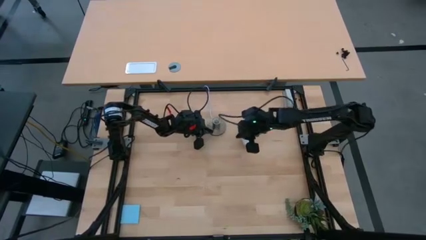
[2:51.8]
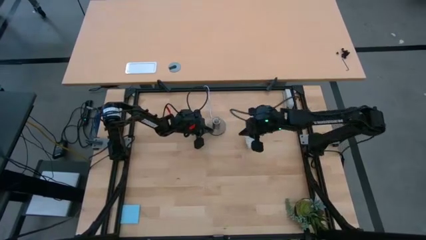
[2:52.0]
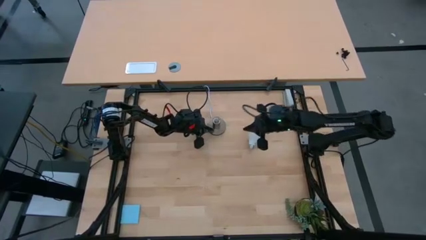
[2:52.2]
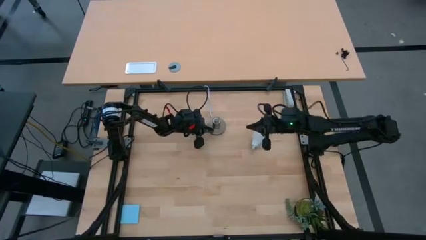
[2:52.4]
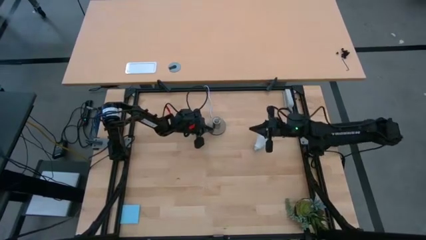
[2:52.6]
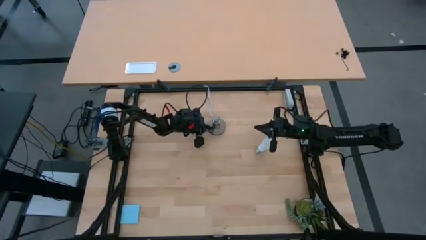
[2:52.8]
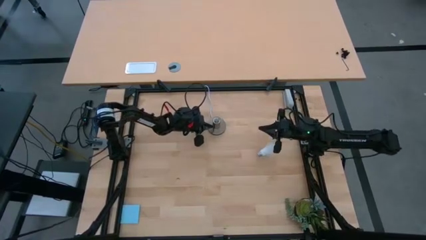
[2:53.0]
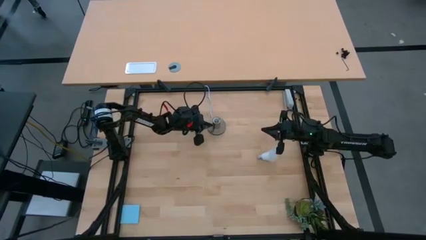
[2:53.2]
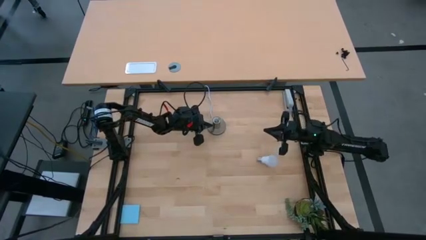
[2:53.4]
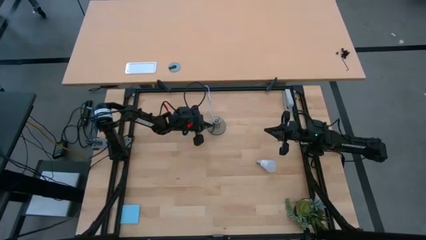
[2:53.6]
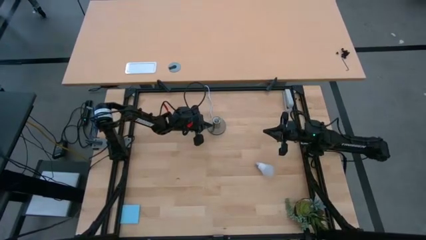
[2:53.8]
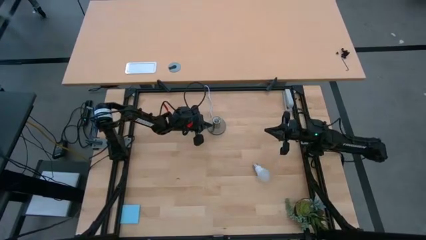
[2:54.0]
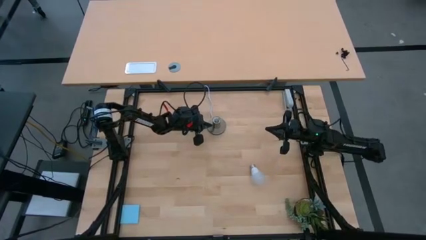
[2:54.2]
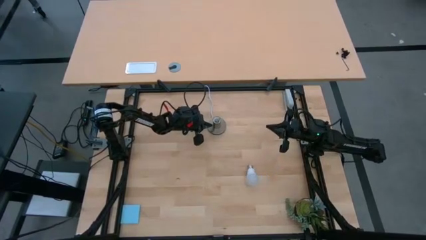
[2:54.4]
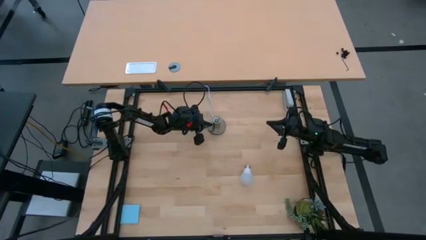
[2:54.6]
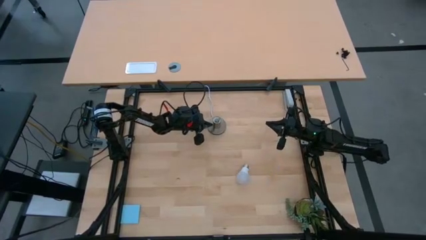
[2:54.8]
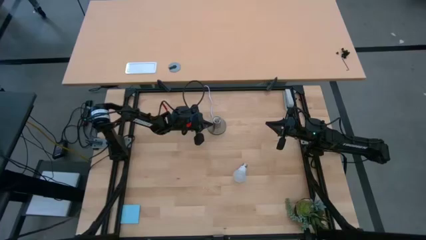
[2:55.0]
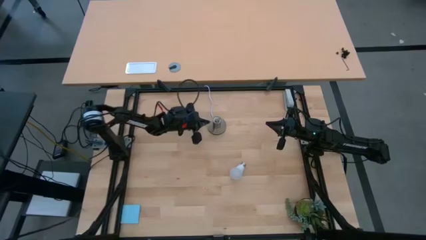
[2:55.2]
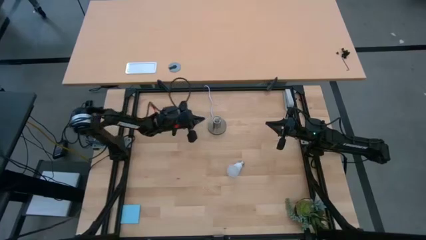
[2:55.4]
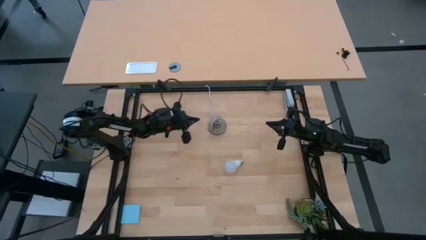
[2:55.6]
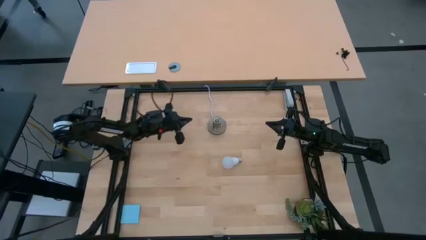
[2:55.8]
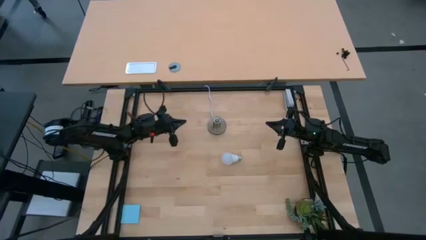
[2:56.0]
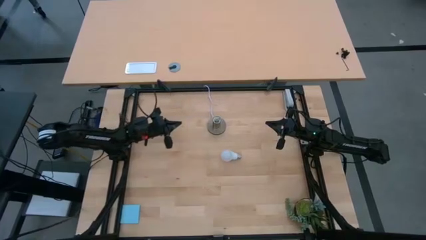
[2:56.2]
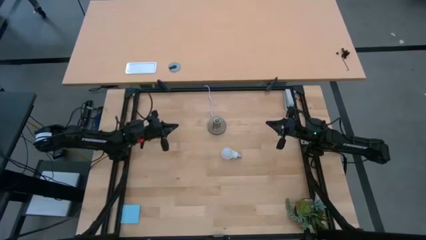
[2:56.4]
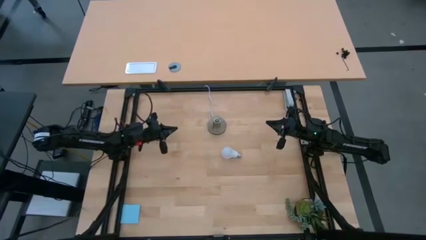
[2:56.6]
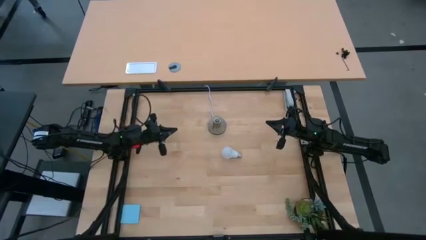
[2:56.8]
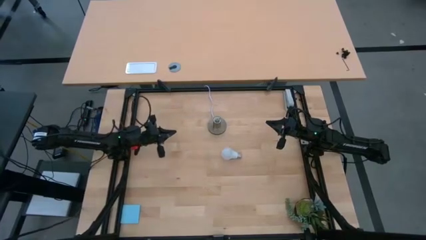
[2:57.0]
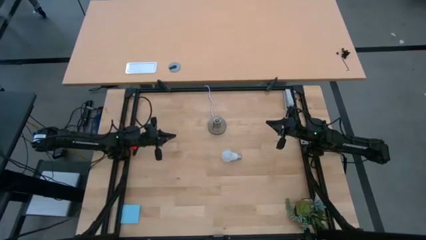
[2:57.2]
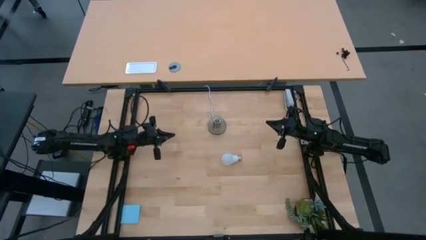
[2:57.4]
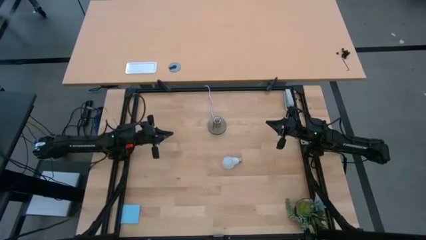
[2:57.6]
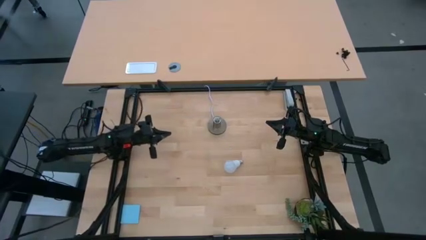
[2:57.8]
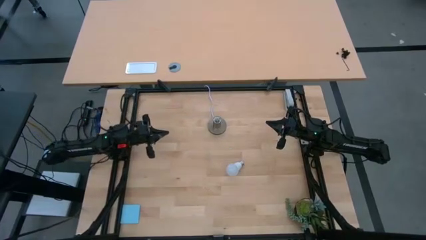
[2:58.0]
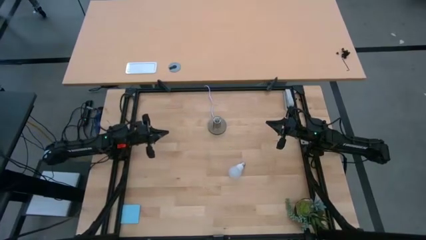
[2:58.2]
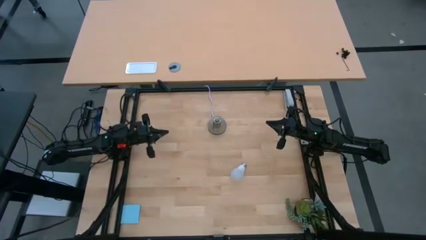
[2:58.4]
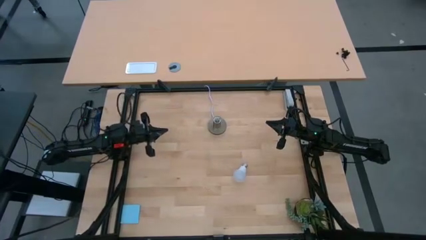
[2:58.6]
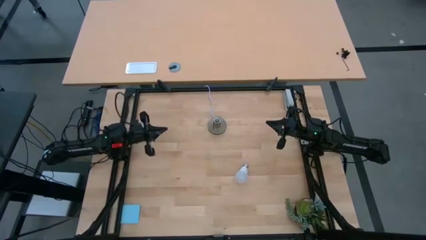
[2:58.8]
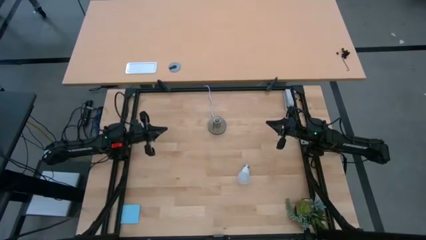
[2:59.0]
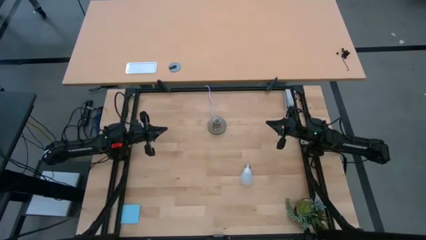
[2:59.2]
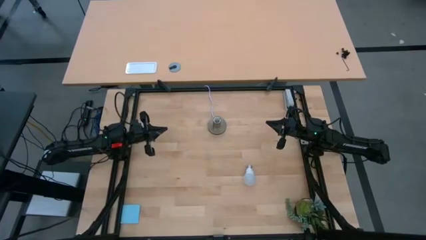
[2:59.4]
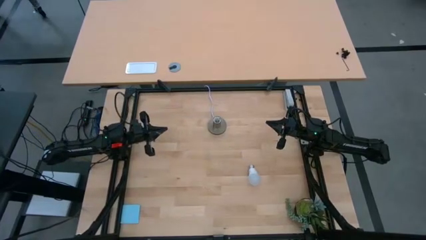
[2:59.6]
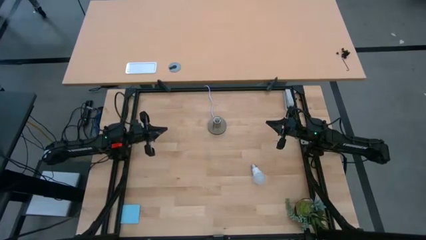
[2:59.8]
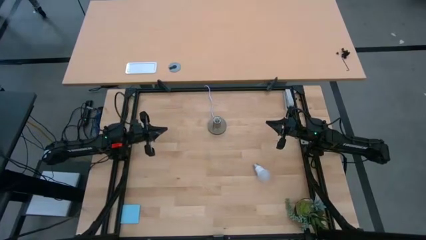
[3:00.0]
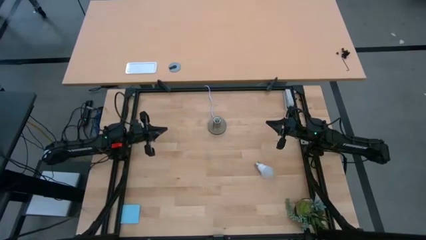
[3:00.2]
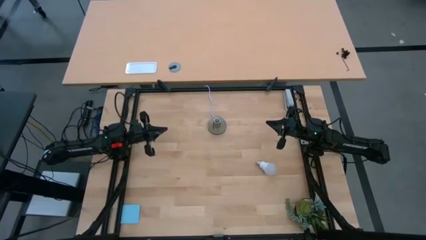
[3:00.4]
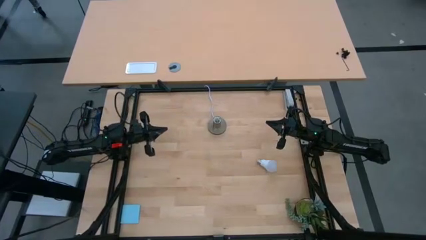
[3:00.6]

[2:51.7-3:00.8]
Task: Screw lightbulb
Return to home position

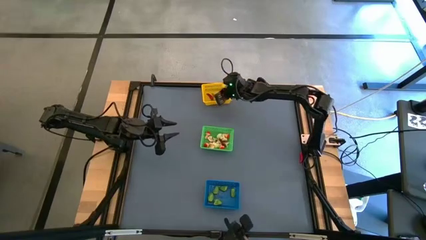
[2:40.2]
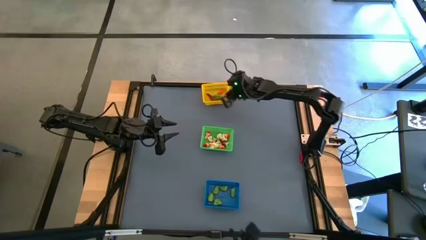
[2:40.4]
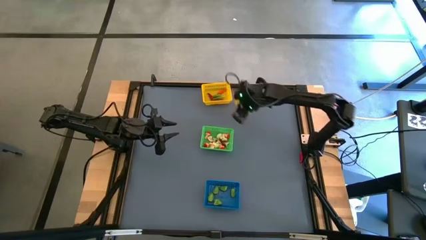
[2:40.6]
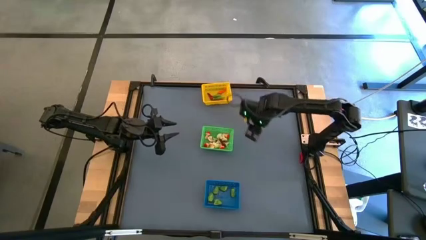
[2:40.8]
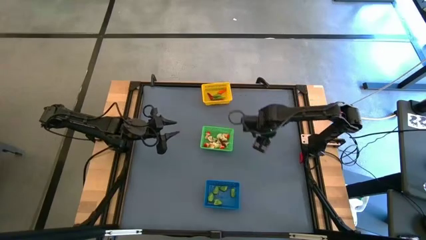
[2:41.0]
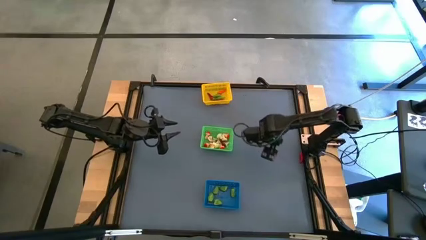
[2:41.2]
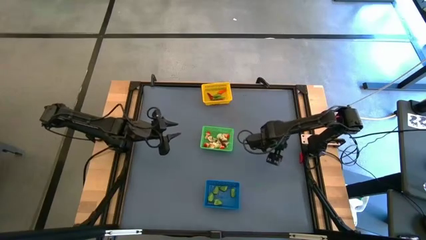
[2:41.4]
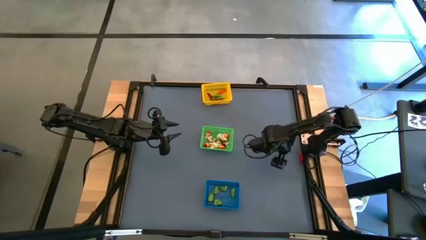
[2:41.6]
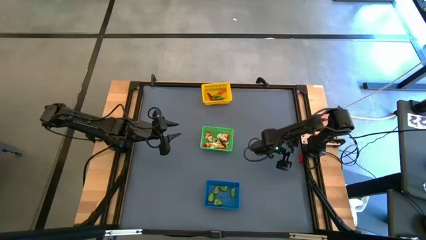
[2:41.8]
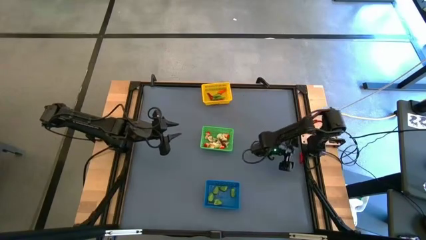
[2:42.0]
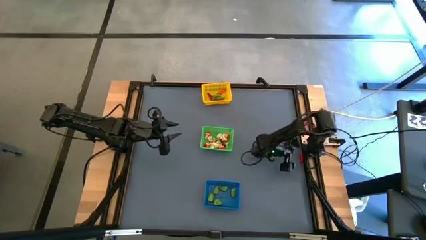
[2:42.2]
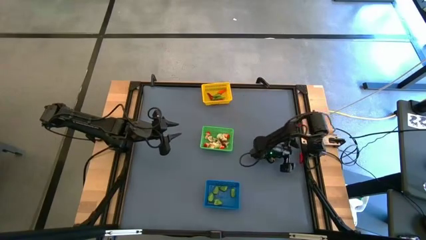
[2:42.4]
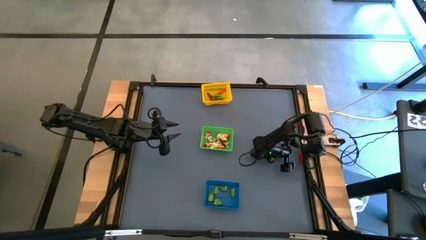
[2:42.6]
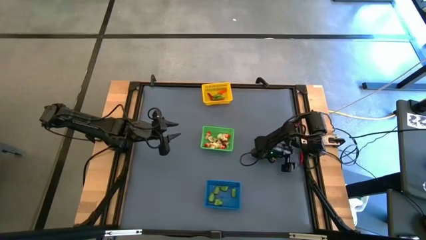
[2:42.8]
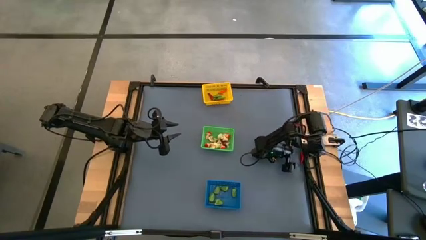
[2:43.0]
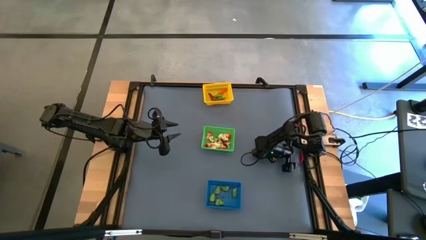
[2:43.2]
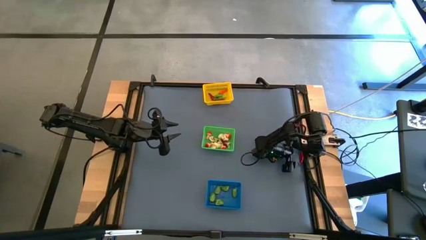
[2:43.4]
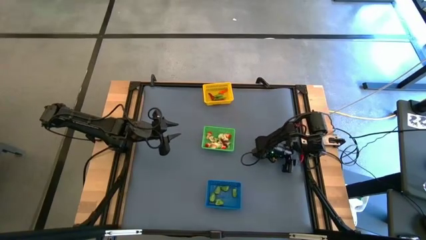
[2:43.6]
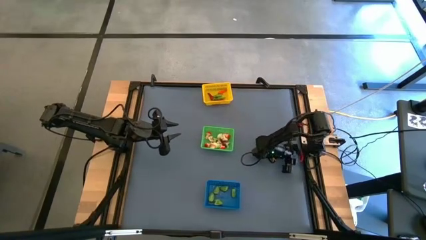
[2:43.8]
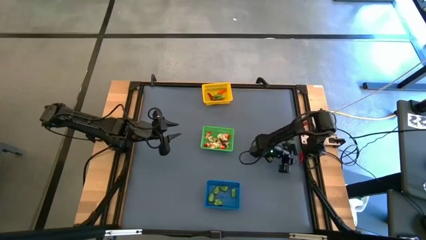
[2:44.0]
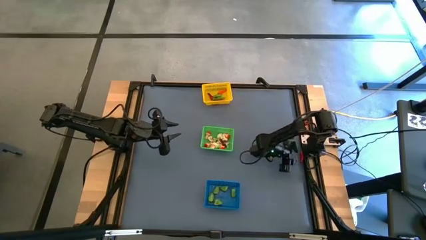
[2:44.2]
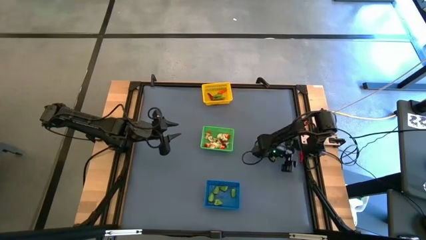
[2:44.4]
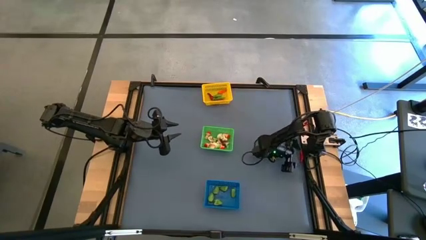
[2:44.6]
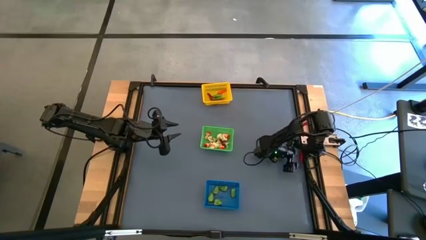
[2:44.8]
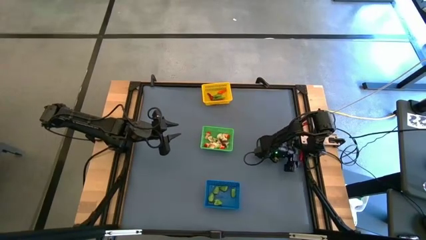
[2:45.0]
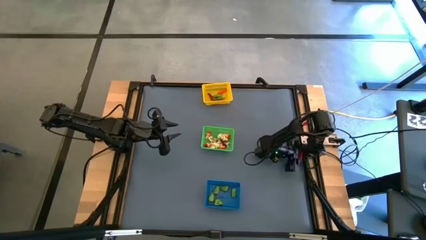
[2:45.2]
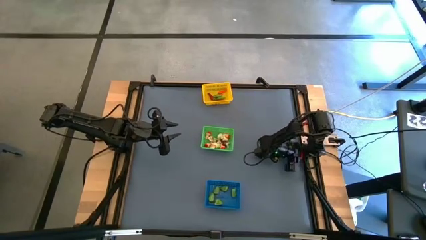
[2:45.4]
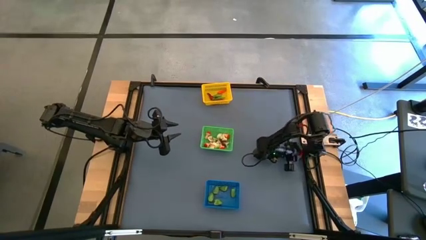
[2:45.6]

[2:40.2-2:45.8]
Task: Sort produce into baskets
Put the red chili pepper into the yellow bin

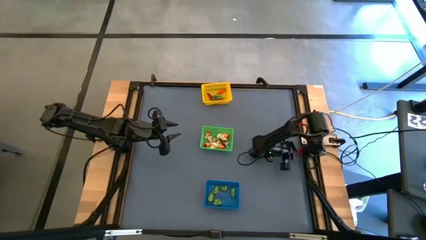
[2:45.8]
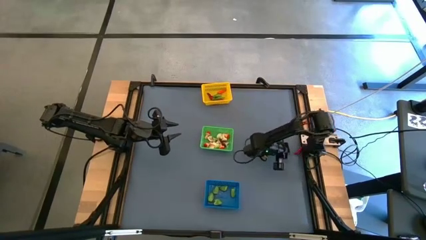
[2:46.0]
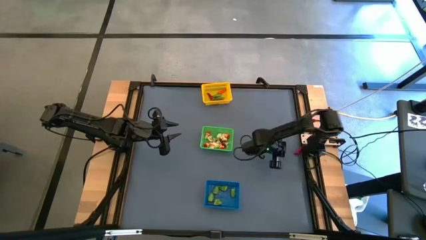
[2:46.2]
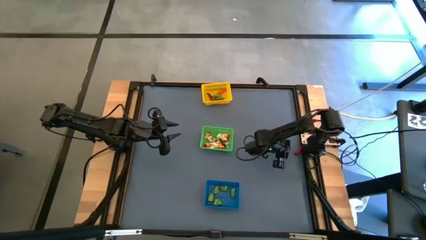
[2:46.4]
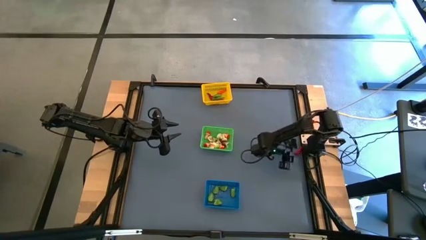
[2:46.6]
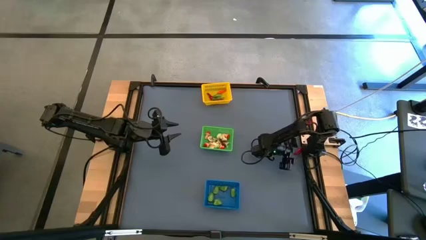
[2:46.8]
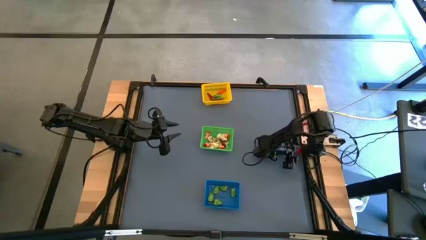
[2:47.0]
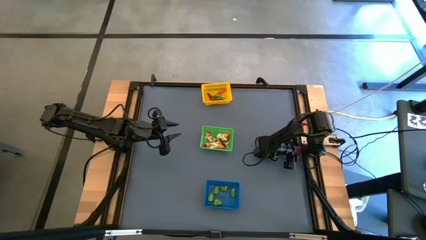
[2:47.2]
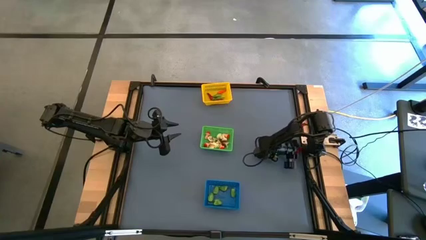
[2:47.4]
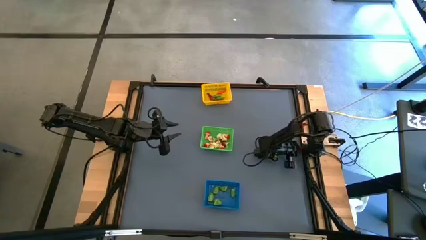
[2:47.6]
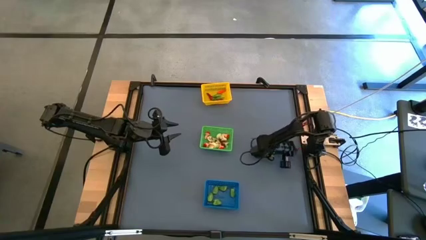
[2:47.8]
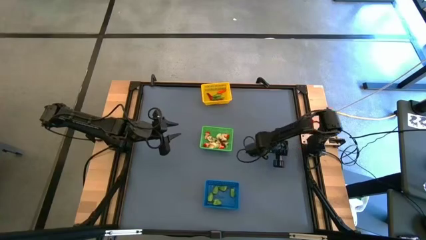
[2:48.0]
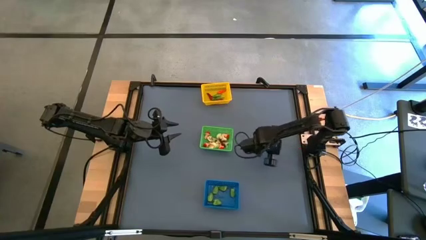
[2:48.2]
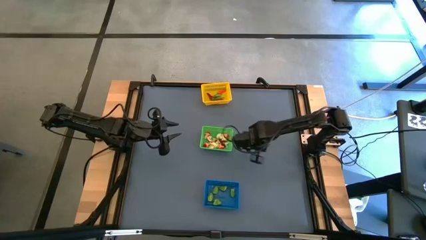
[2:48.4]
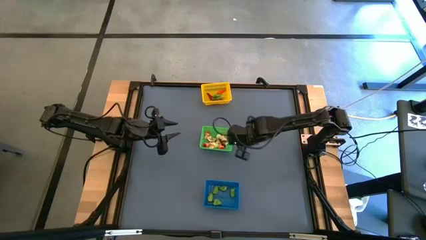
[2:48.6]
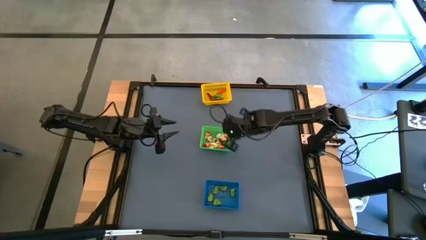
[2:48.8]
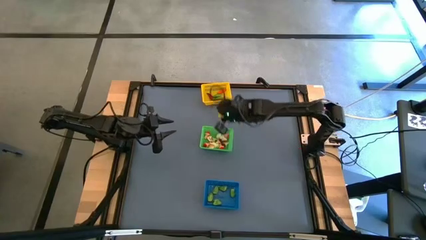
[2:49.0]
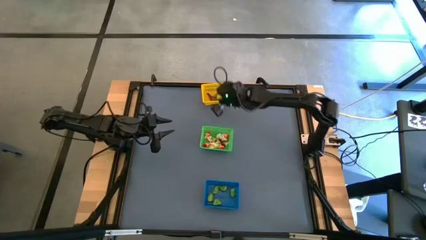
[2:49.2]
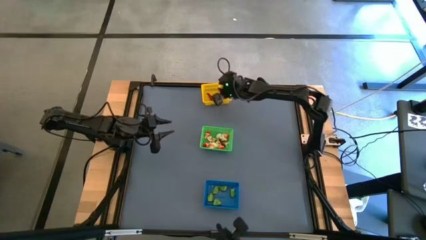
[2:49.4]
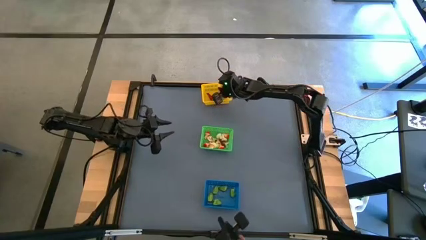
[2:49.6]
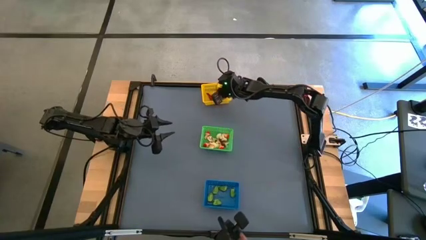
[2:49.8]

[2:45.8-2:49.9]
Put the red chili pepper into the yellow bin
